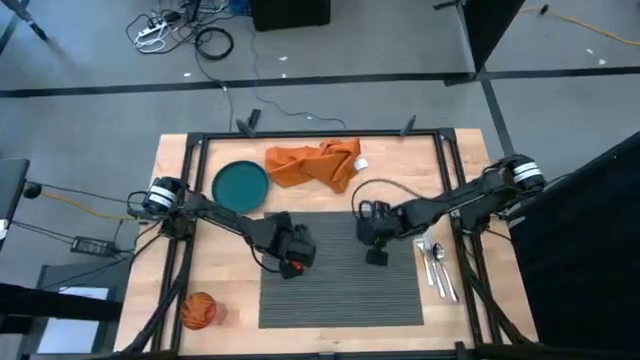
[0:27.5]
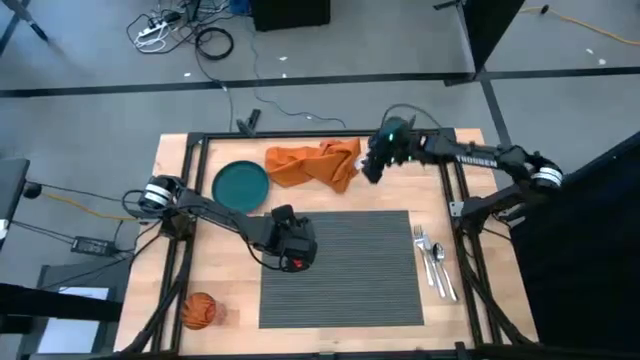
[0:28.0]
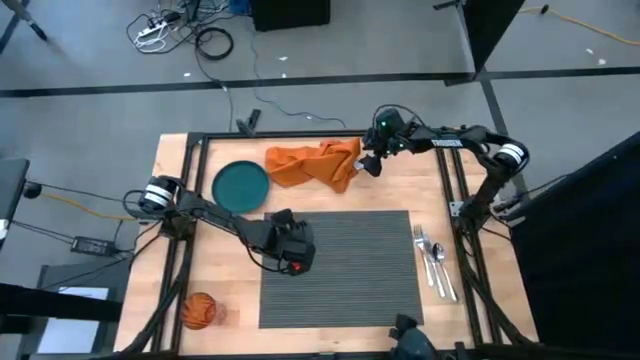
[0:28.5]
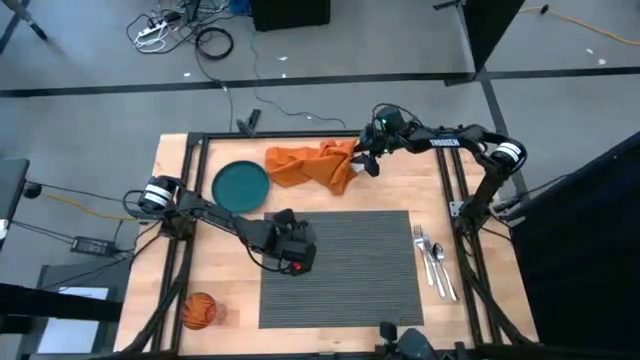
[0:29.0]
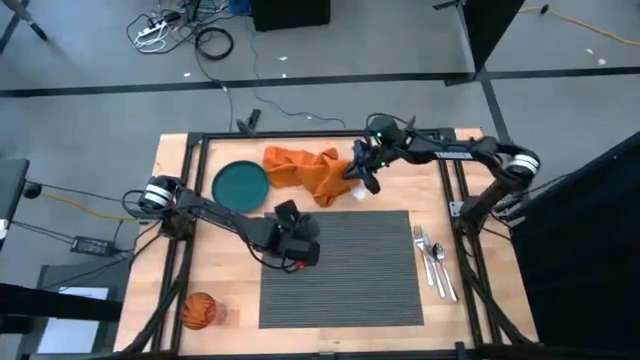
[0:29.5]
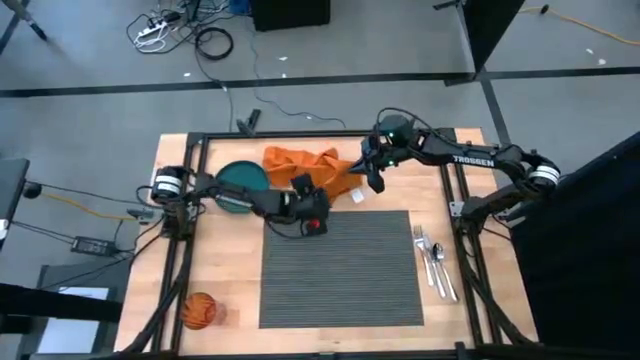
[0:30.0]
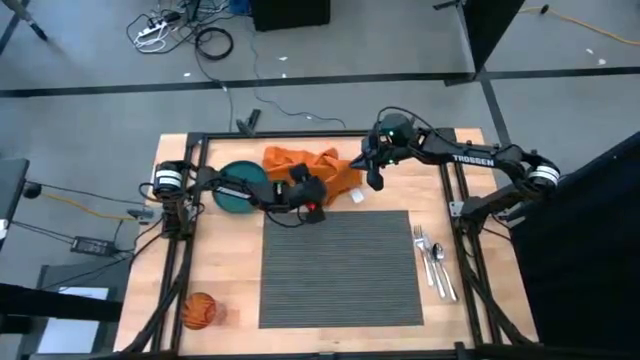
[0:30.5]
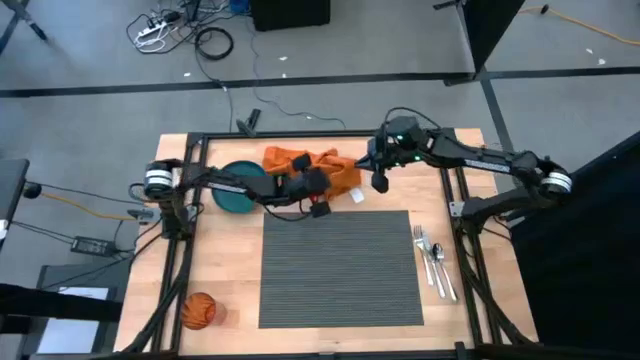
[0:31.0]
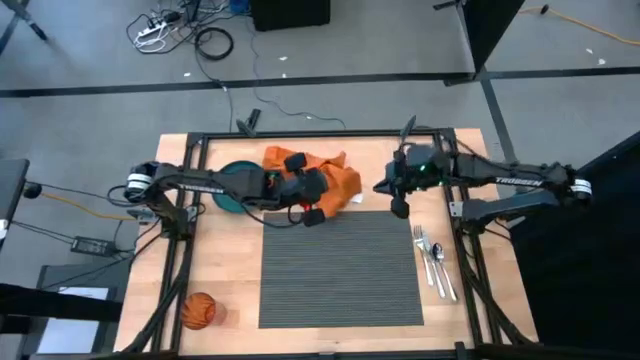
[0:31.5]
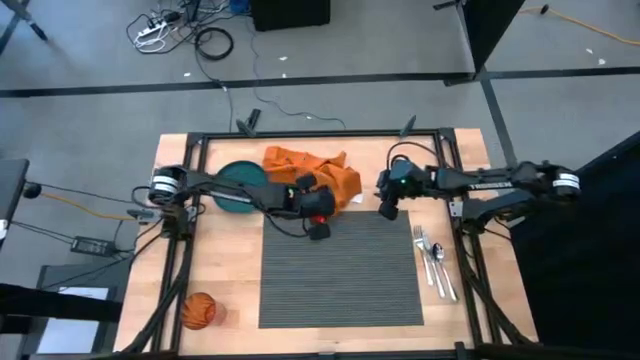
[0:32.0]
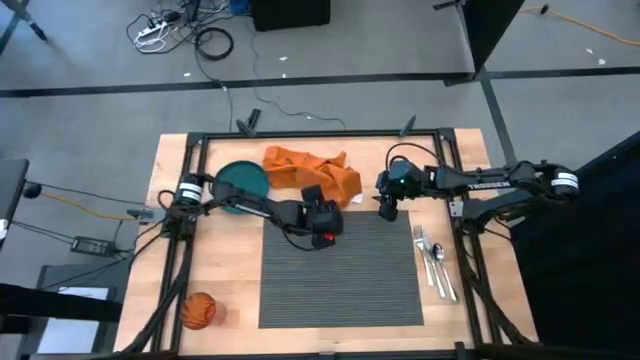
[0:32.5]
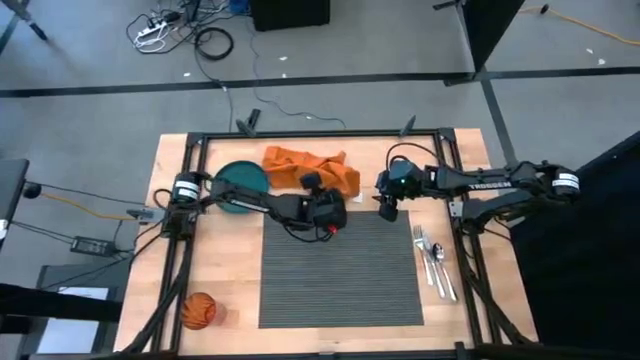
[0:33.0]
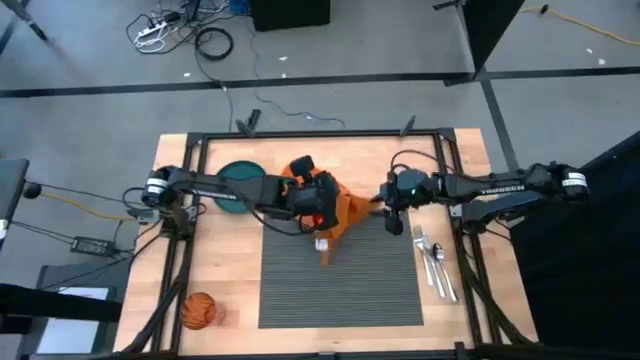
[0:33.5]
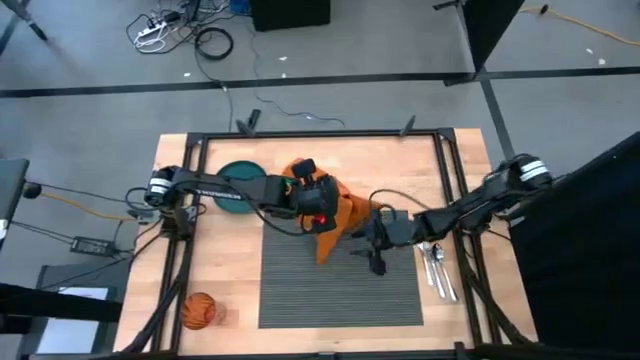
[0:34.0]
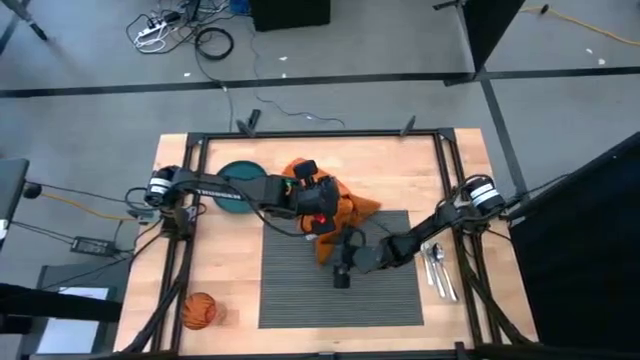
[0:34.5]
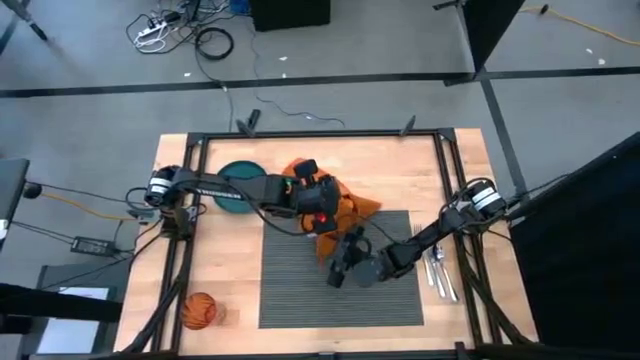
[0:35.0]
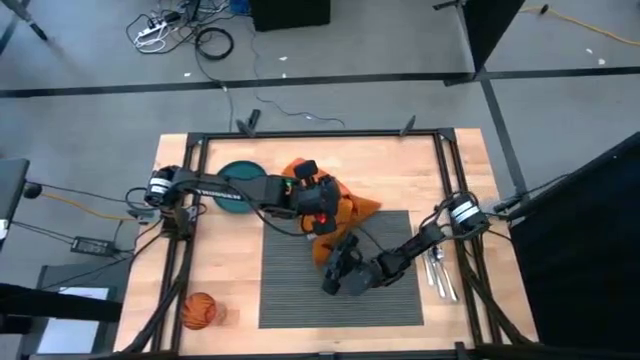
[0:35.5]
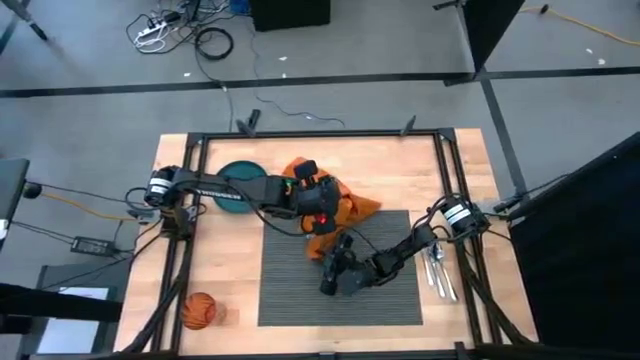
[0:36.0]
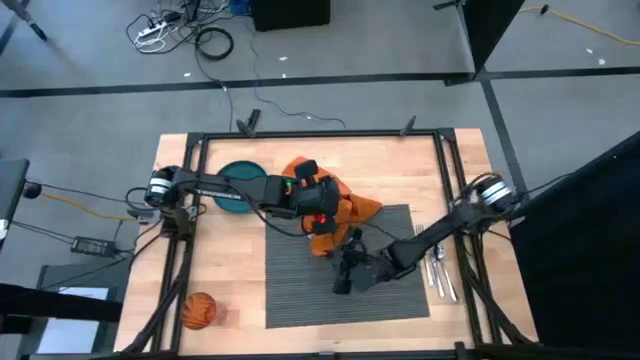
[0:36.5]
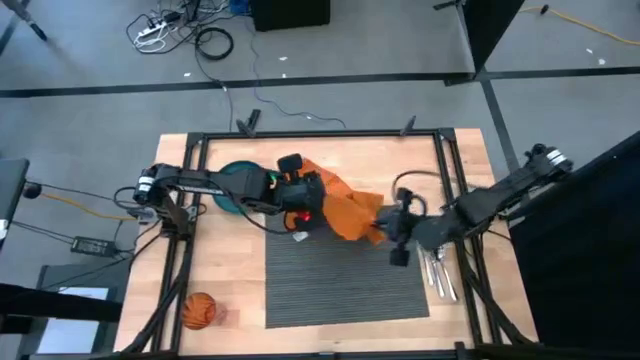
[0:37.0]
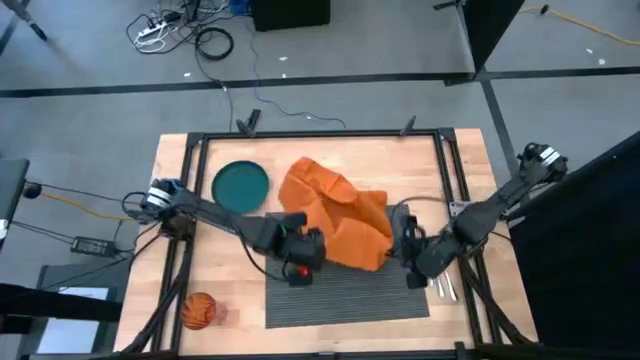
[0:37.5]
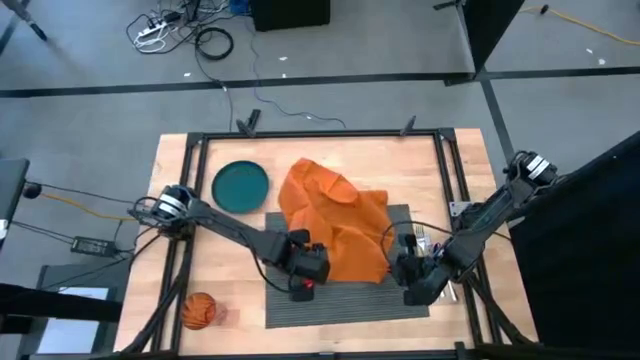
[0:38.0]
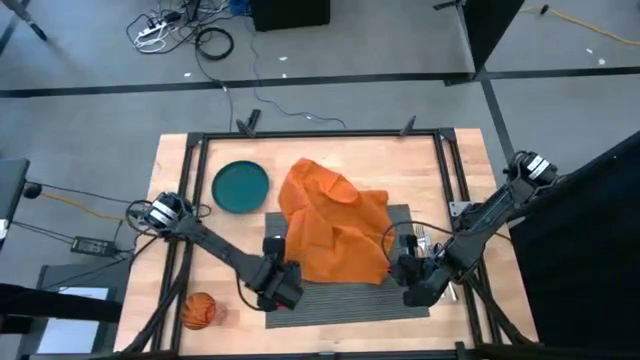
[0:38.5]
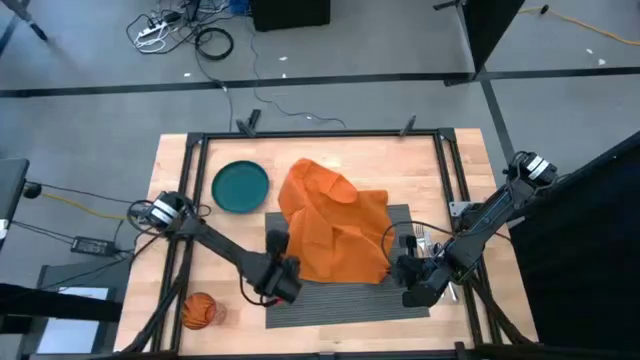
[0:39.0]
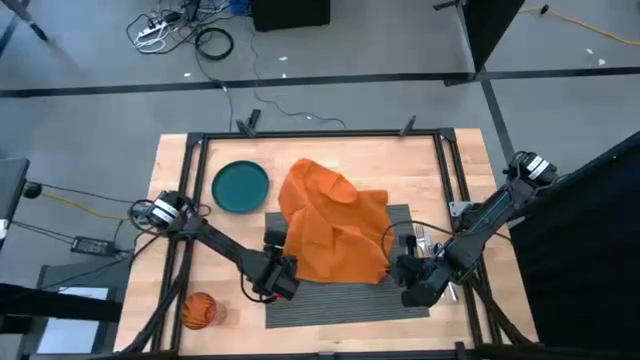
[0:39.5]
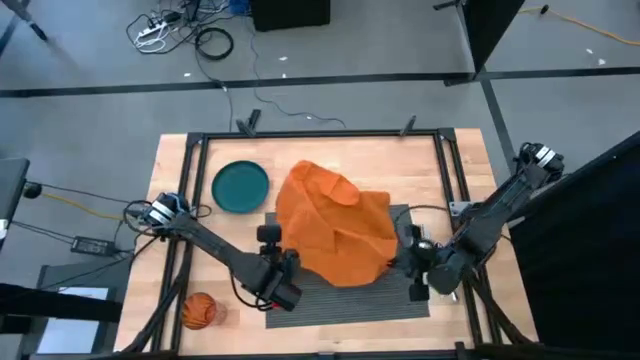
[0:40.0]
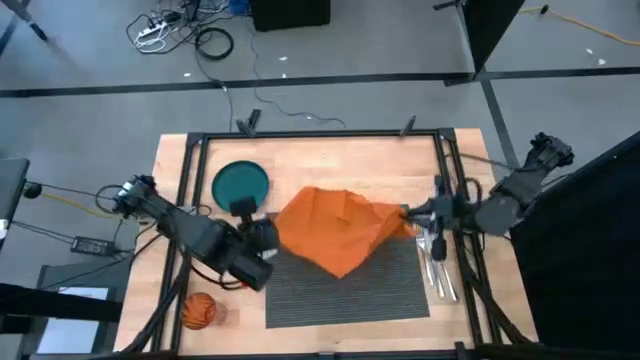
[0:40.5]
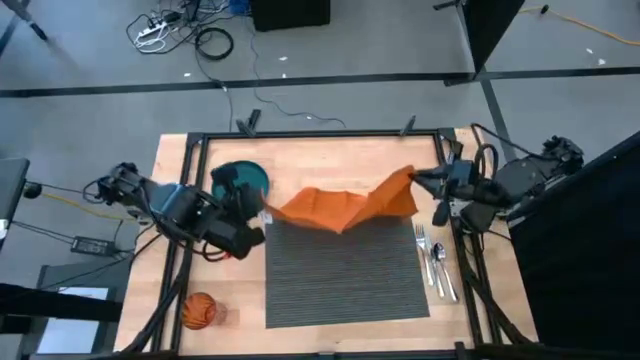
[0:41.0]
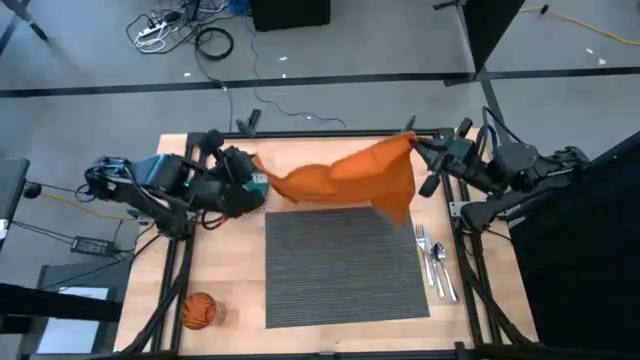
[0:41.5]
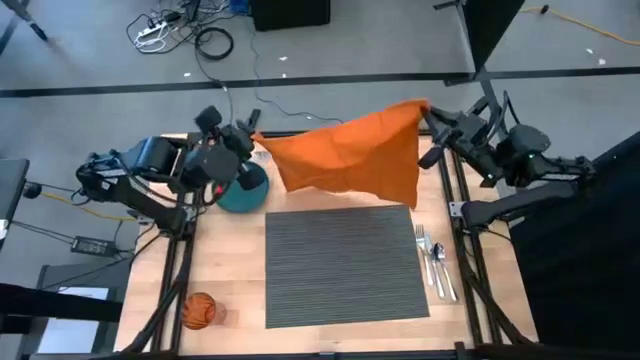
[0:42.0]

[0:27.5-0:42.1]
Task: Set table place
Fold the orange table napkin

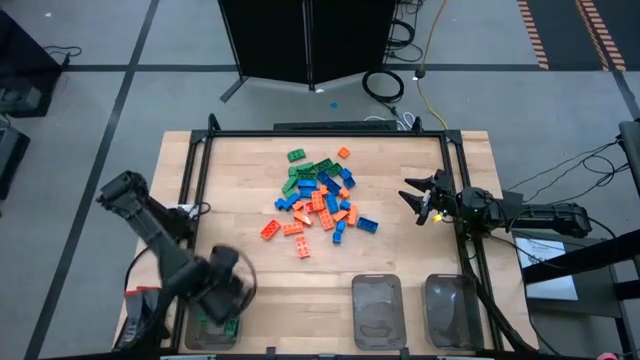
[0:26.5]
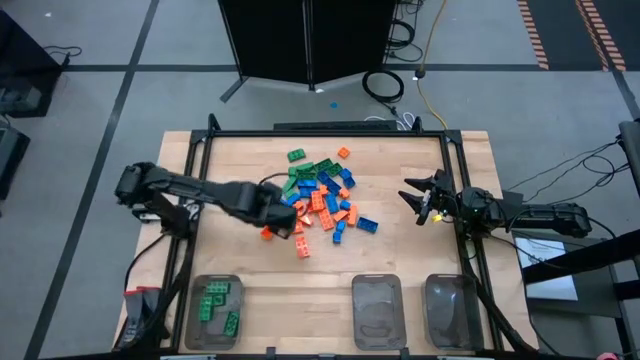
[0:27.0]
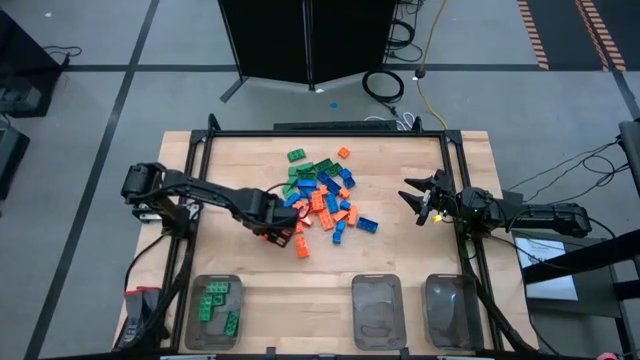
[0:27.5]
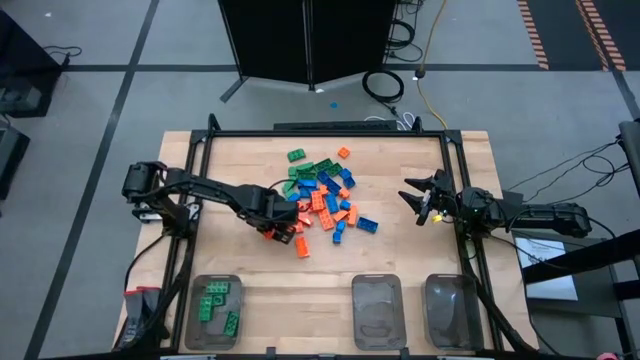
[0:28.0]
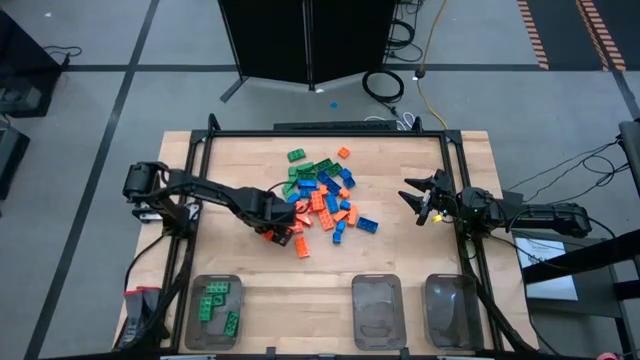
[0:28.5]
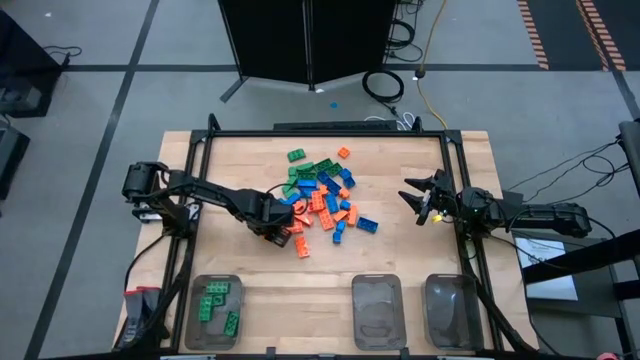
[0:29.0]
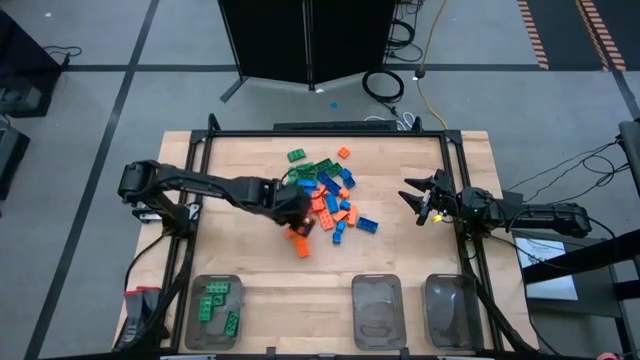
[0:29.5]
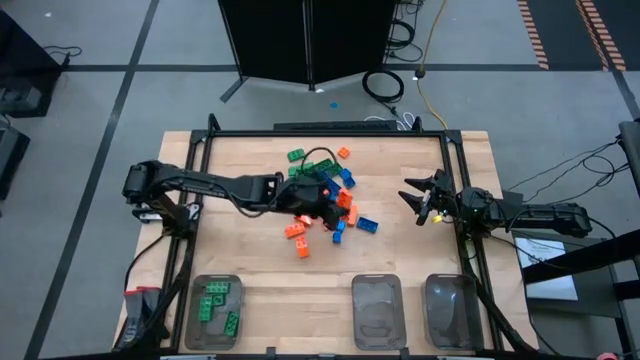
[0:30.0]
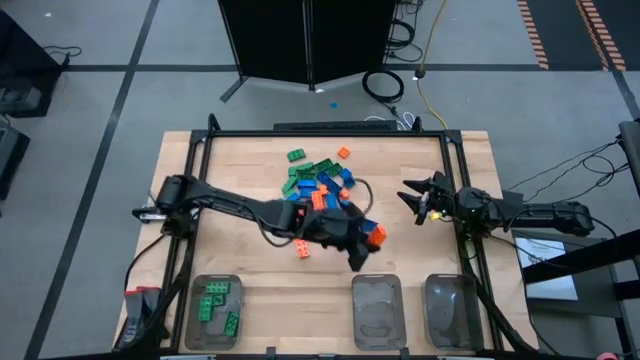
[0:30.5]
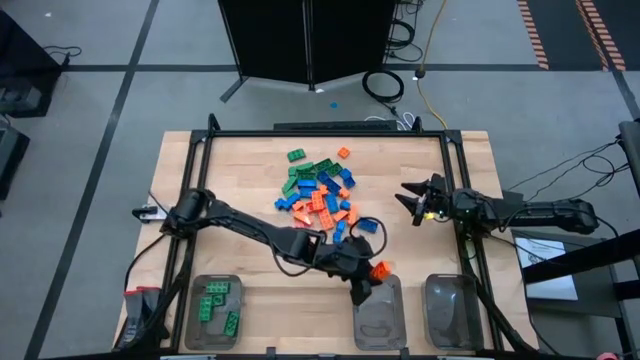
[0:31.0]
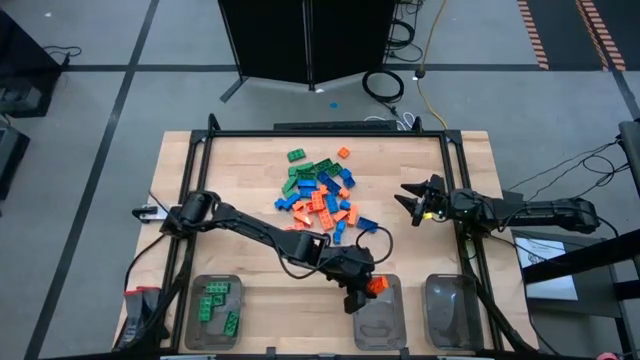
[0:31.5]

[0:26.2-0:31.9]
Task: Sort blocks
Put the orange game piece into the center black bin
